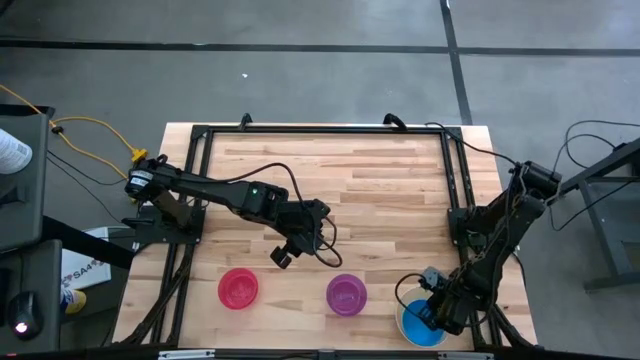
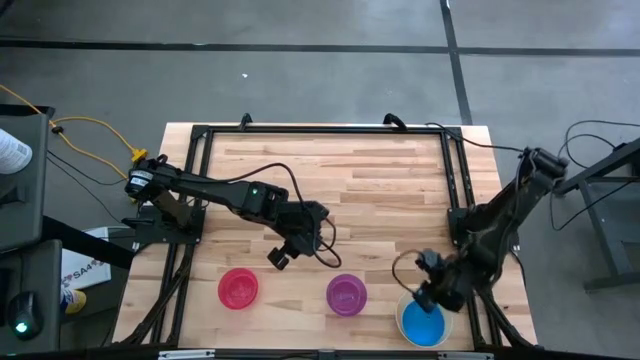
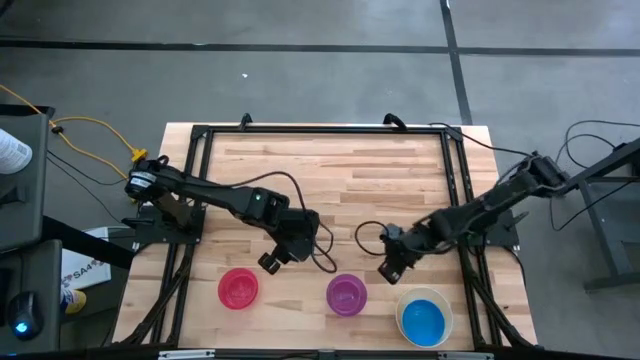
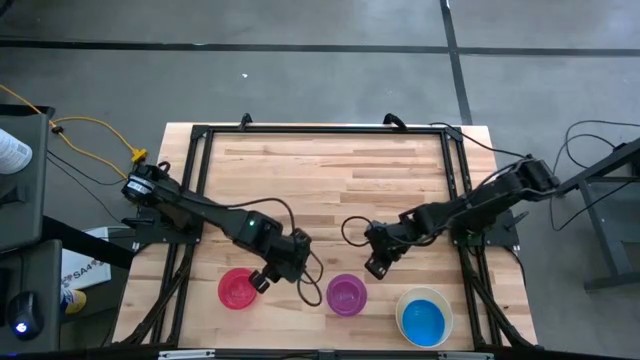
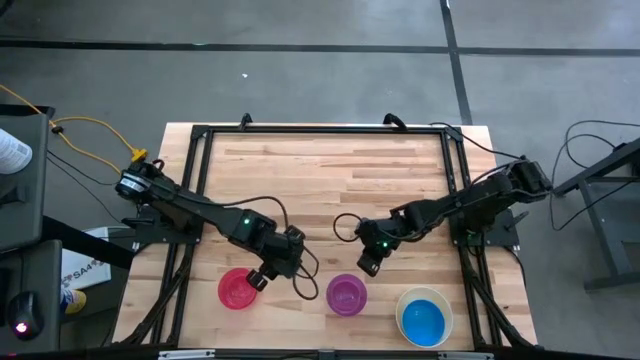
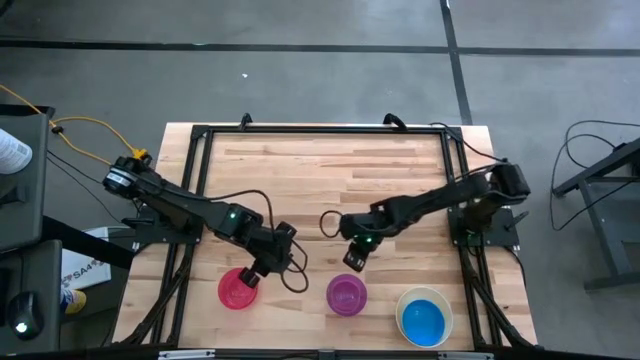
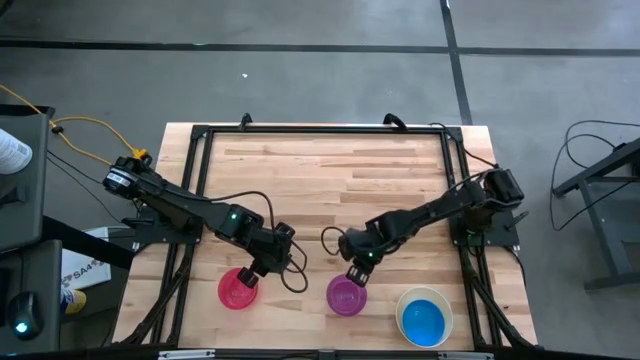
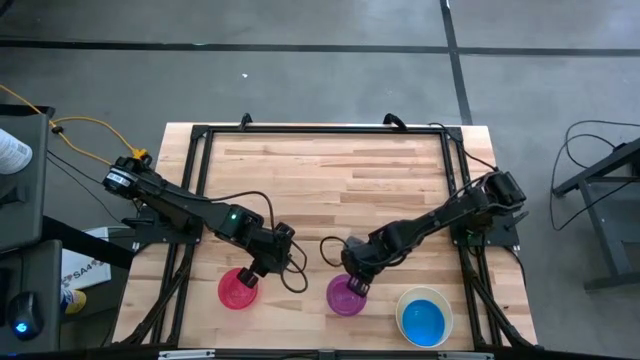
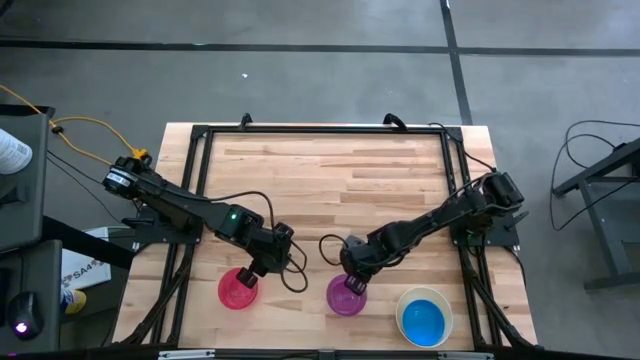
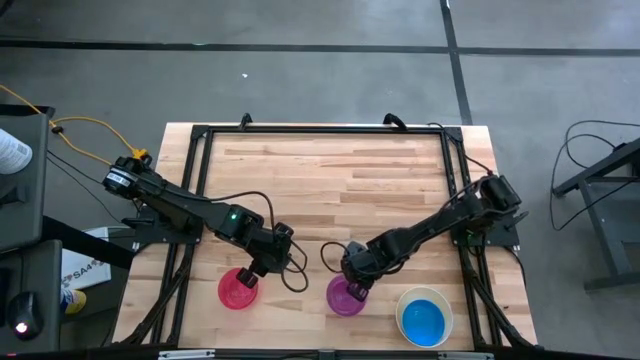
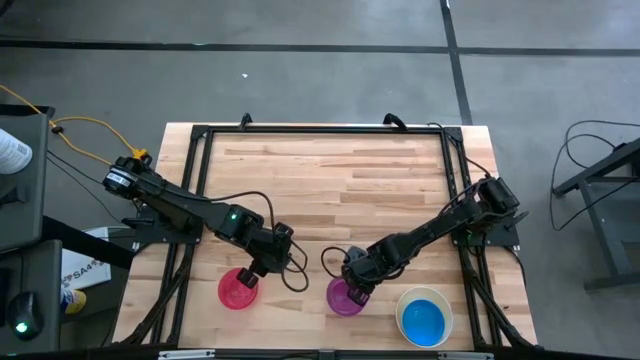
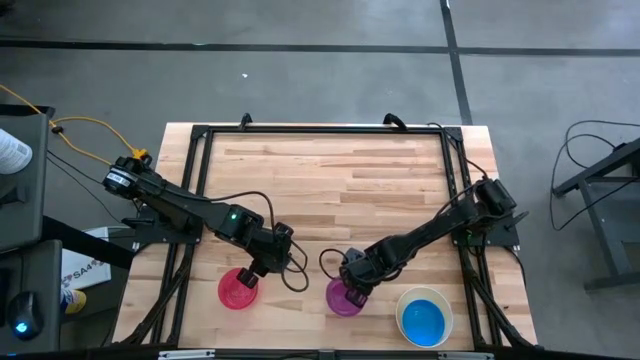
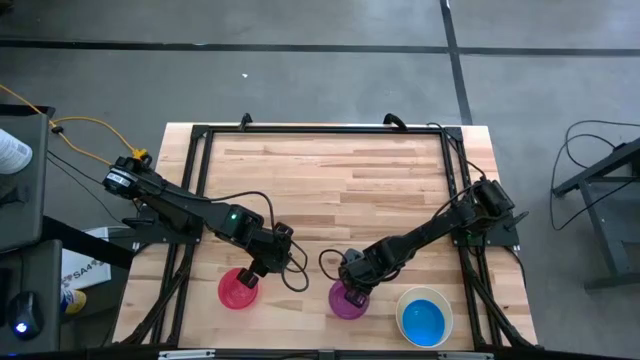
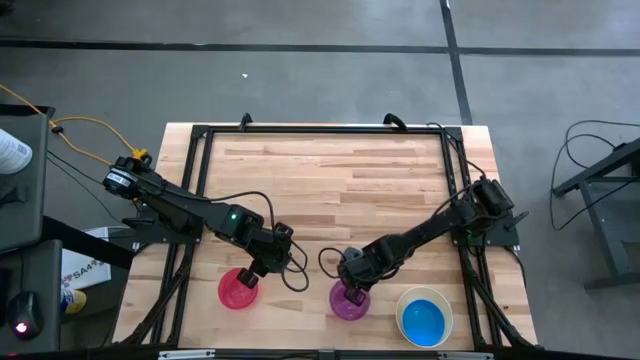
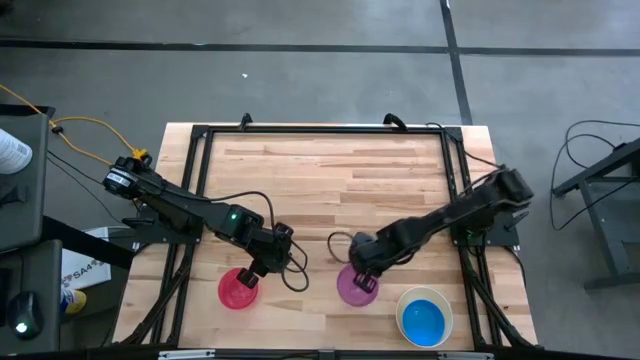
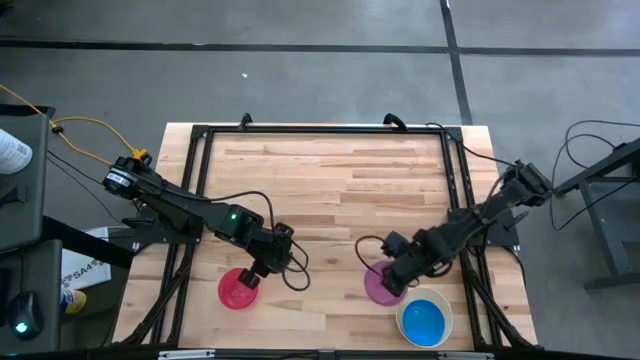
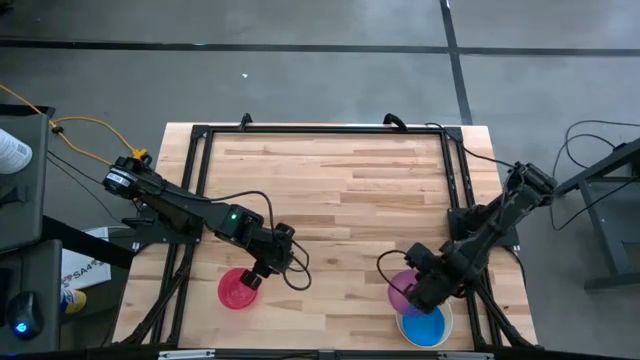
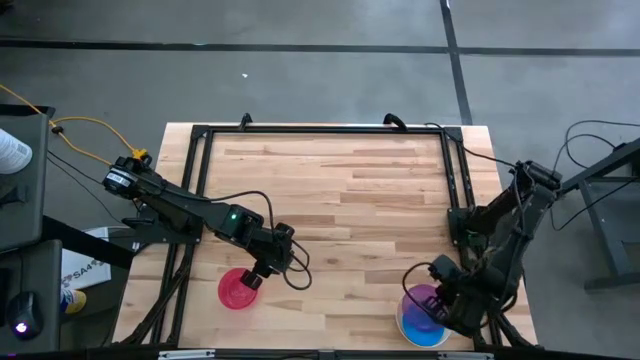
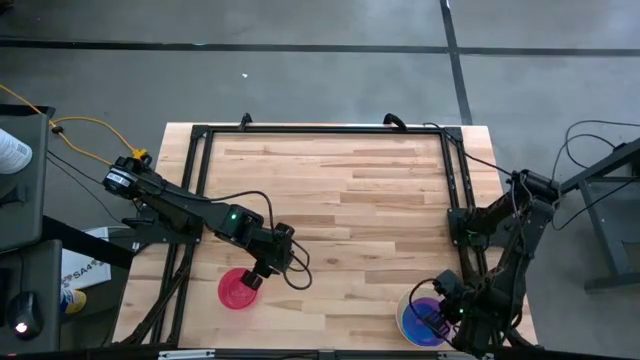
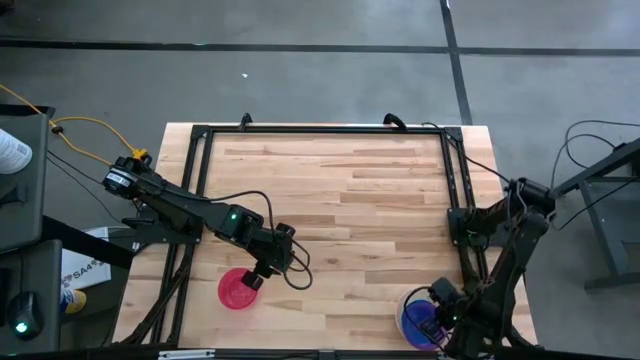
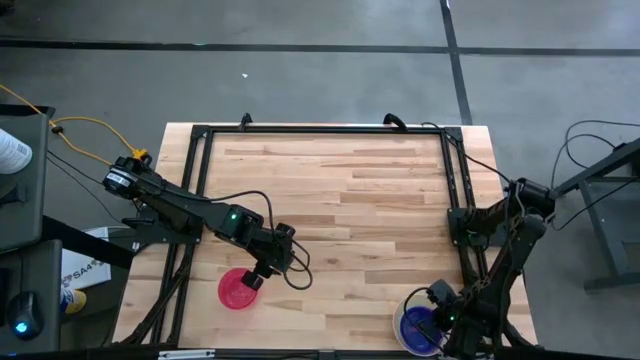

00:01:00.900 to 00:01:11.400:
Stack the purple bowl on the blue bowl

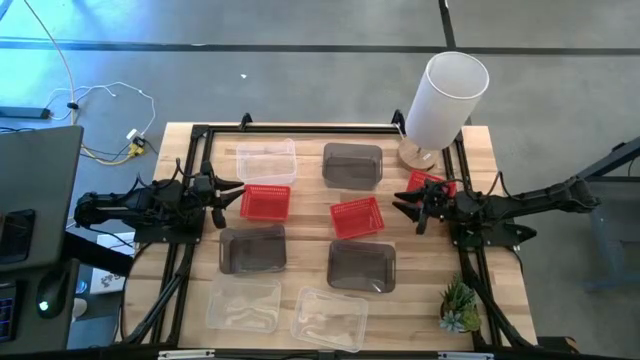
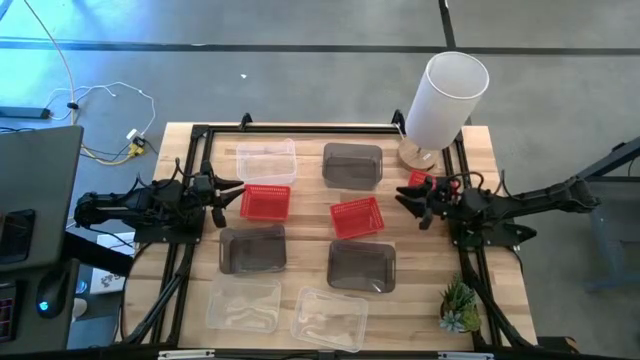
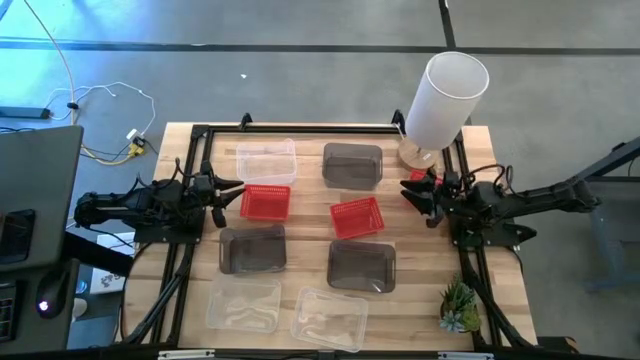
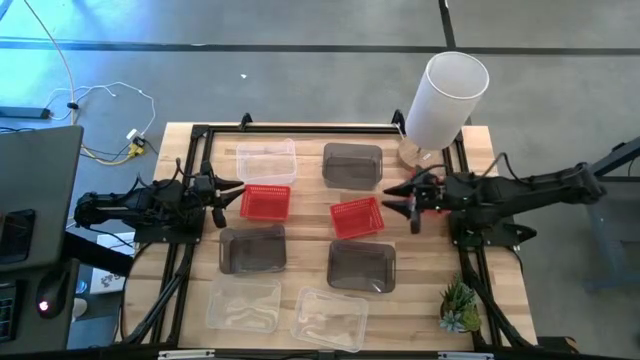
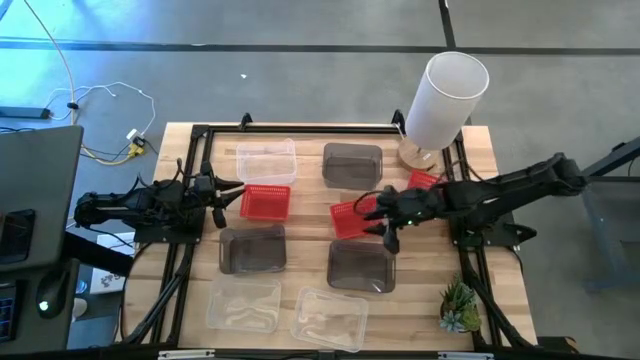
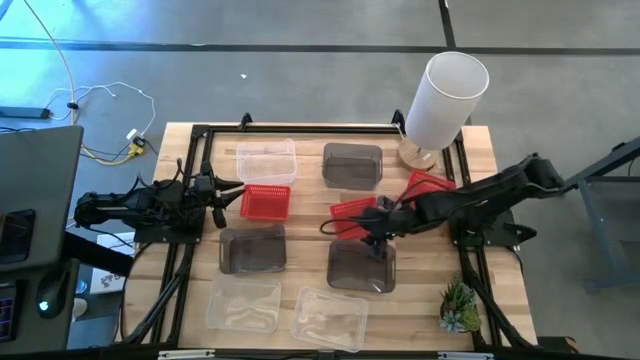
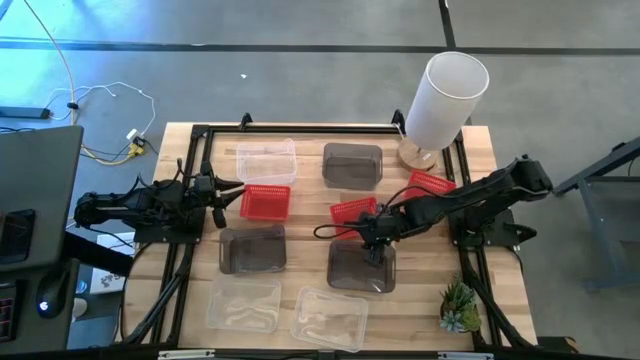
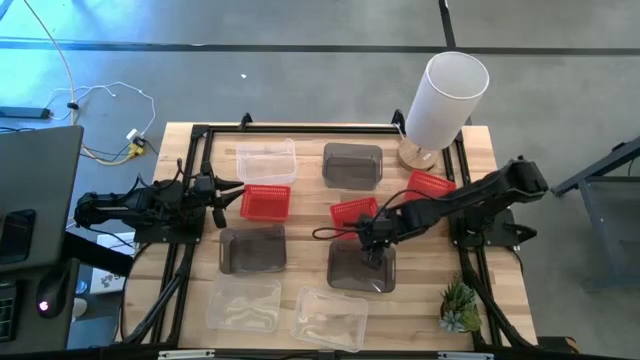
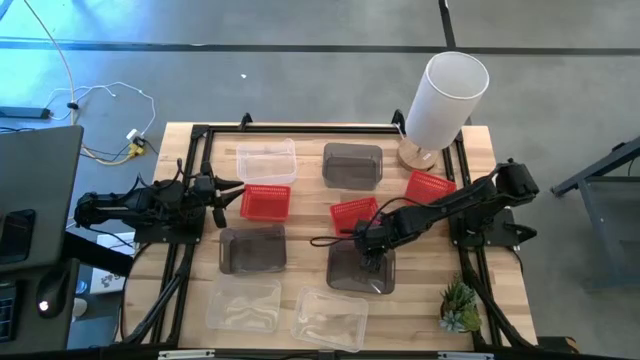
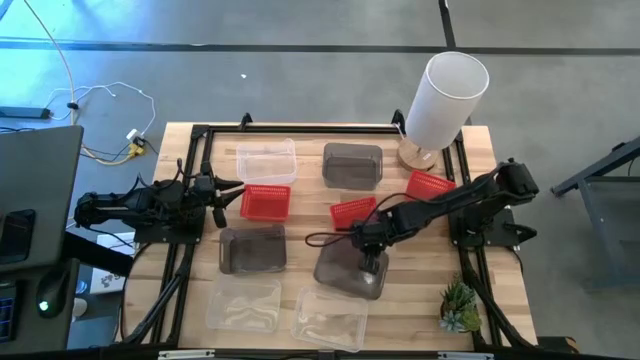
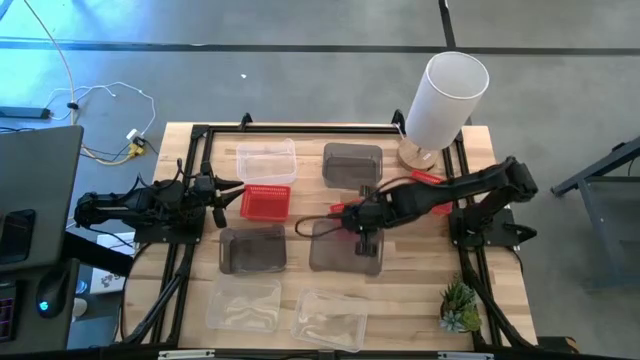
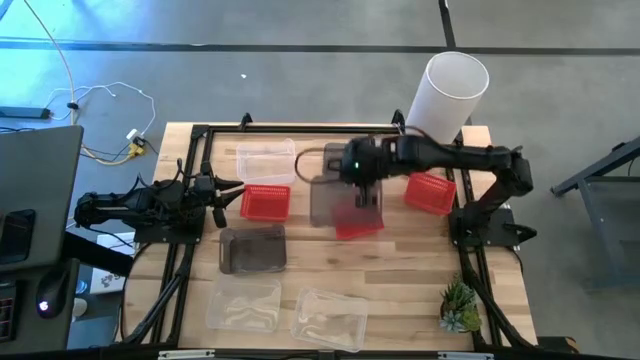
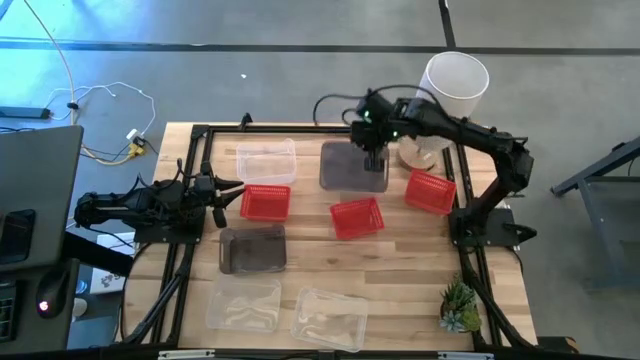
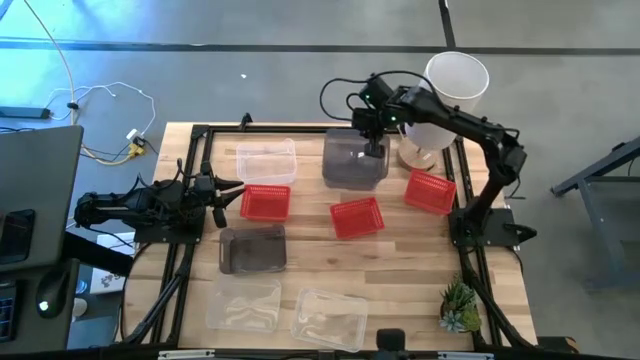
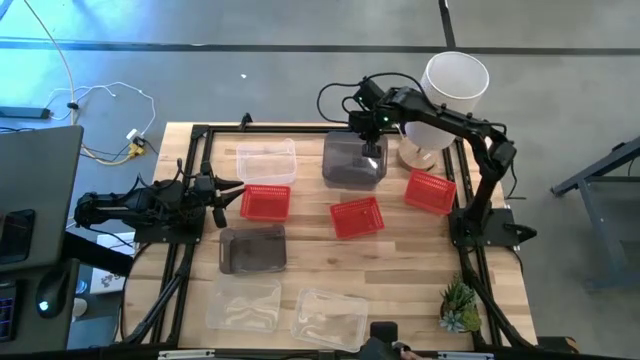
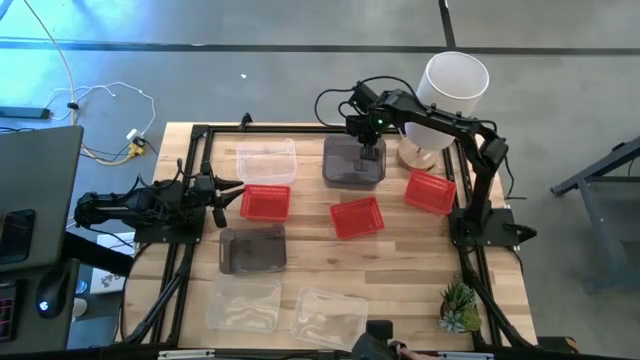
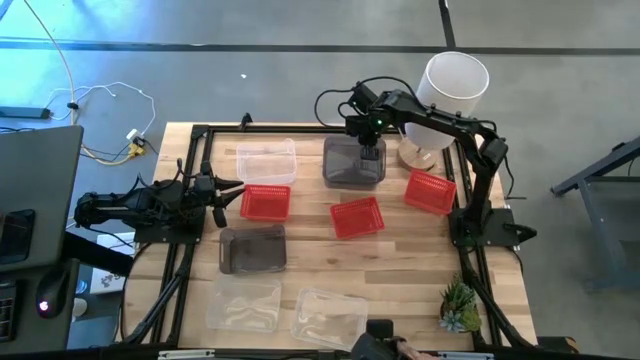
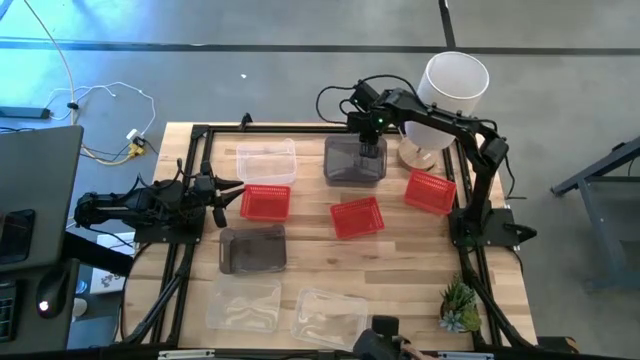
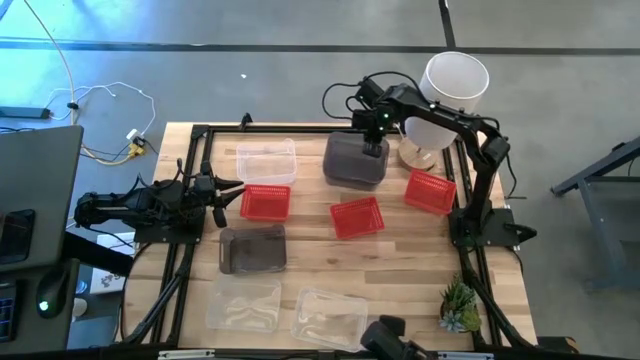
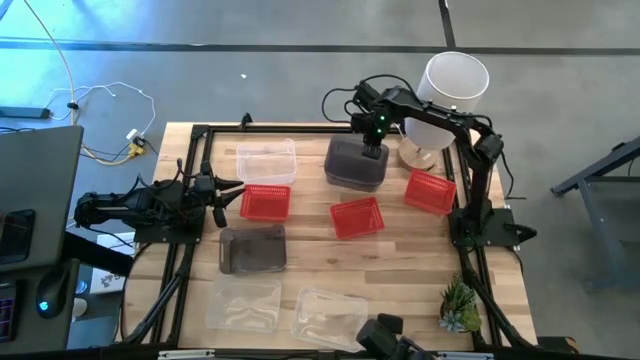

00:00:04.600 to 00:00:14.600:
Stack the right black bin on the top black bin
